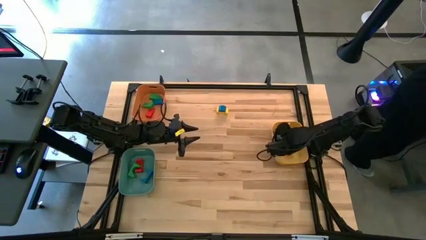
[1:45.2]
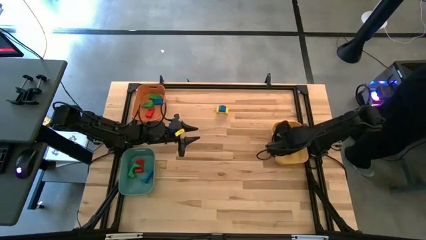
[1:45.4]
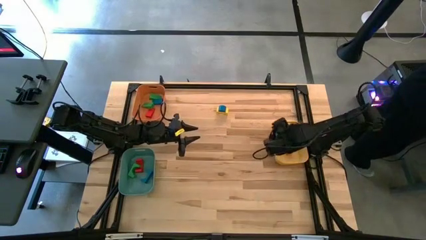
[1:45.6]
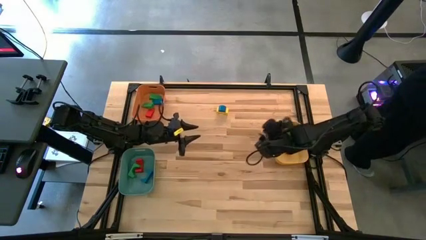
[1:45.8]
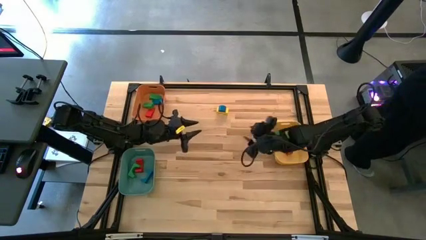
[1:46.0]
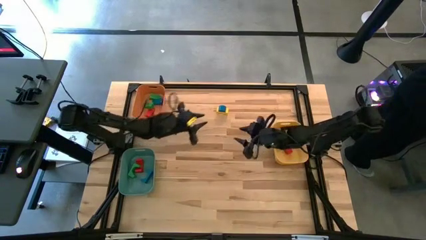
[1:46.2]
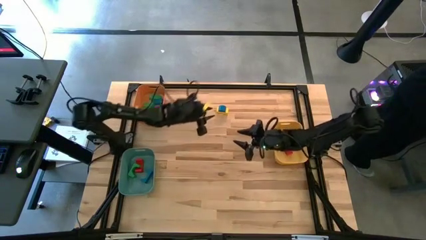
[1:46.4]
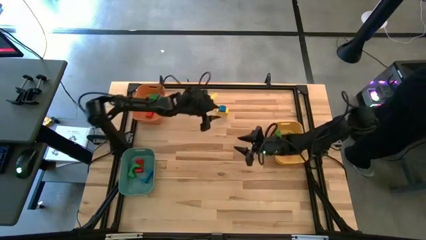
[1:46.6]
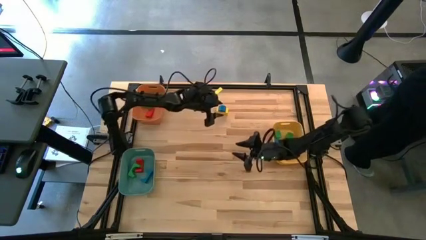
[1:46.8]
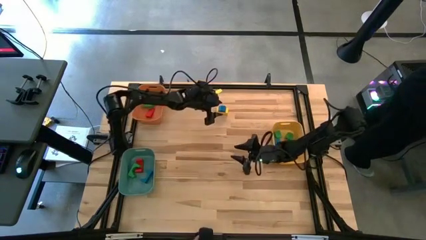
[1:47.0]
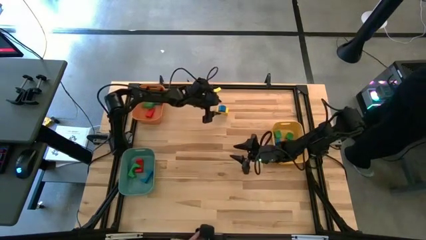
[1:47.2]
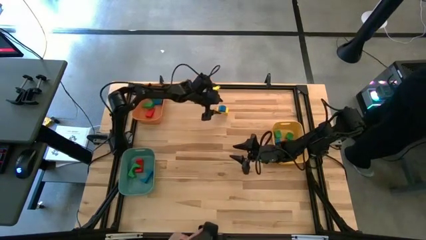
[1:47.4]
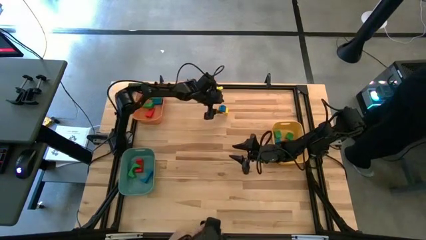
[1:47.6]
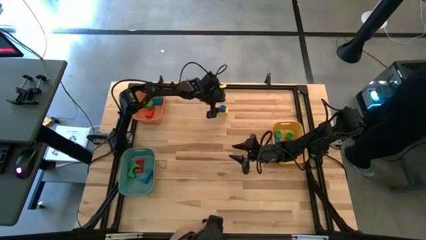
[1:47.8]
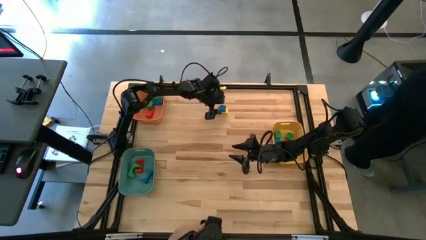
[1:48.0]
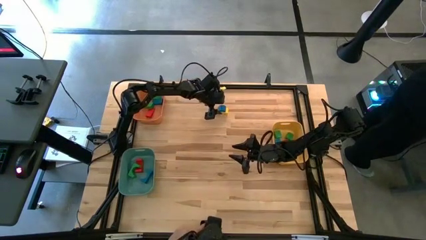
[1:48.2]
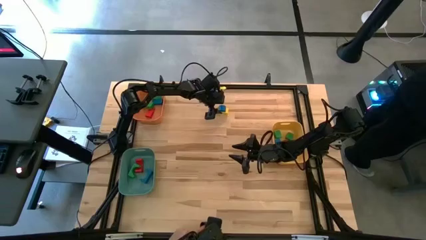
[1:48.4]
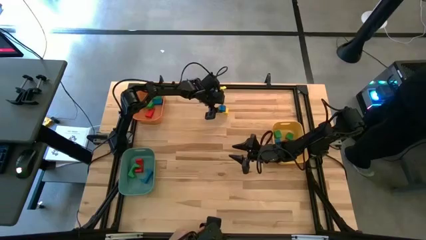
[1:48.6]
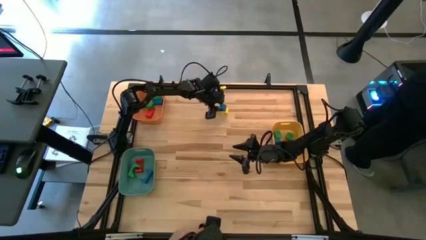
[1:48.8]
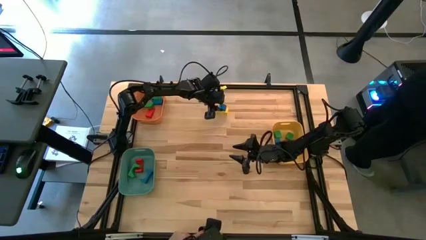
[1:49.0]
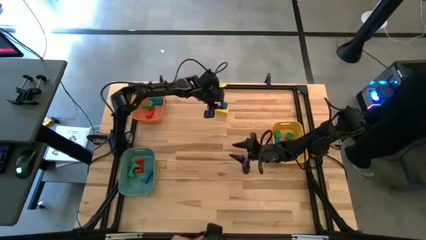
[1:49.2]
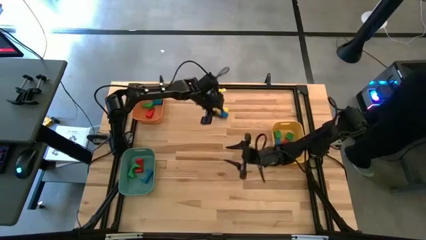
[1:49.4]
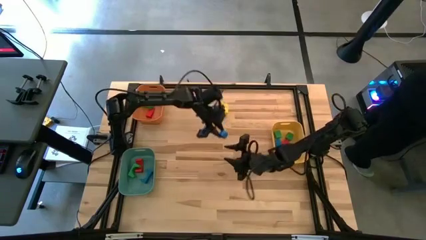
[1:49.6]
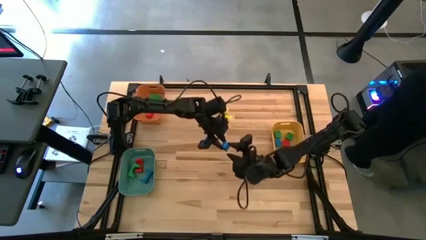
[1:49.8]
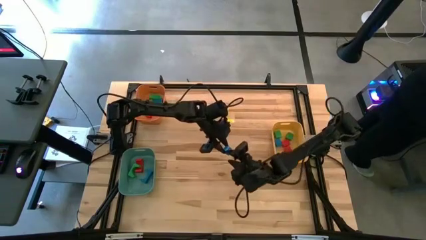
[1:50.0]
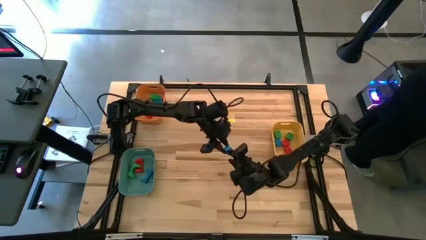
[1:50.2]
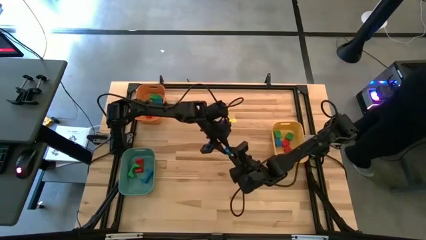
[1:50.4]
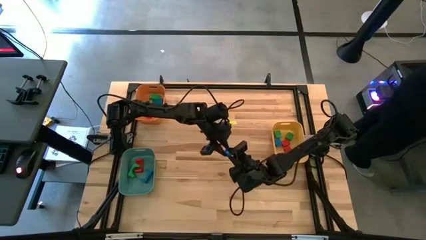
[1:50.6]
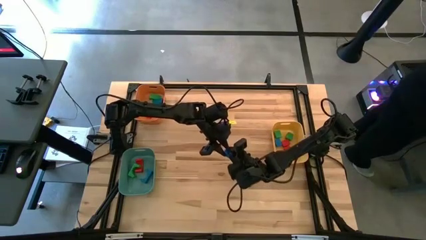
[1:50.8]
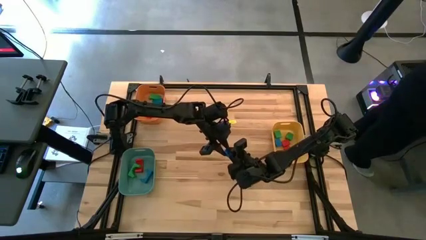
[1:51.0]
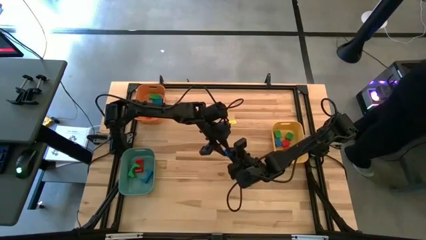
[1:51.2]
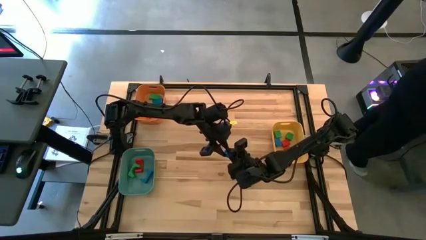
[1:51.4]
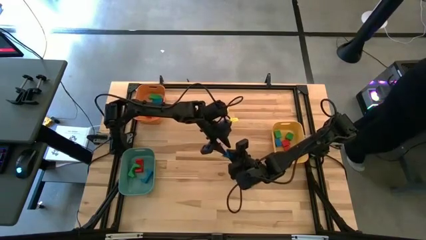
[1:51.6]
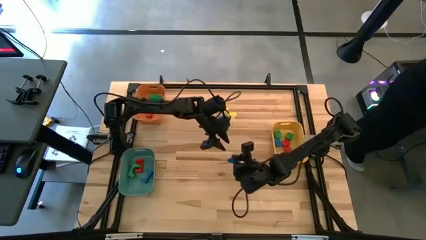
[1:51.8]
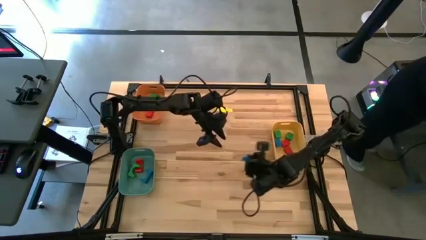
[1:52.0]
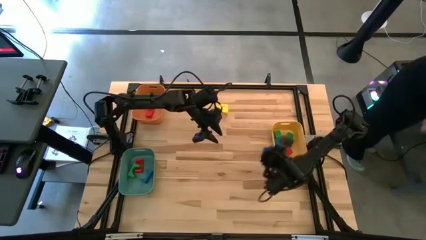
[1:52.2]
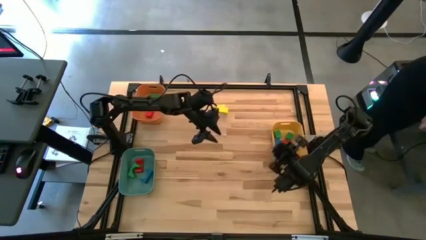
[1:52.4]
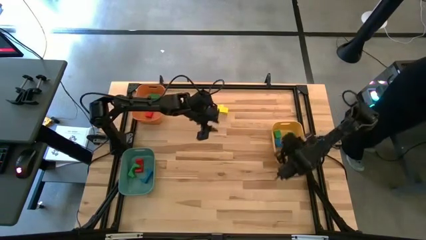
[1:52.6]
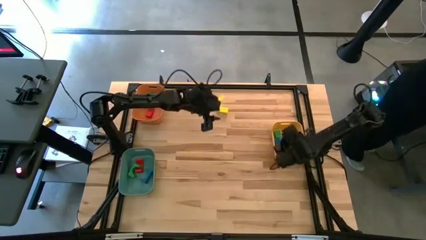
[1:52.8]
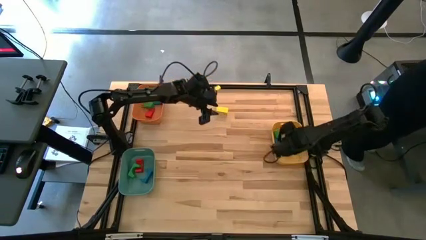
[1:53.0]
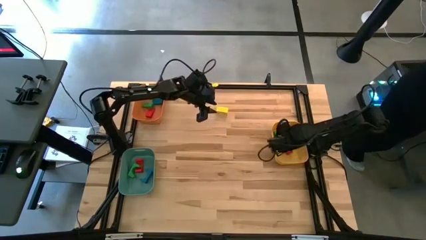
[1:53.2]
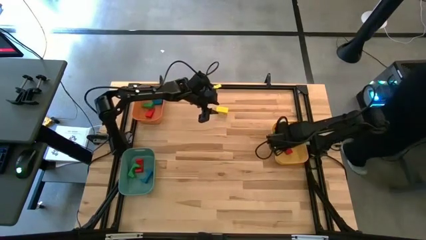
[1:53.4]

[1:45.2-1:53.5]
Task: Sort blocks by size
Put the blue half-circle block into the yellow bin

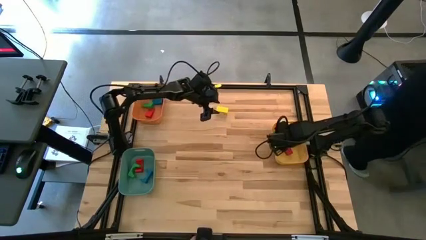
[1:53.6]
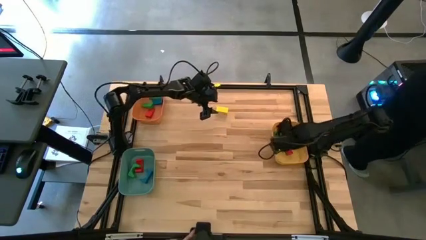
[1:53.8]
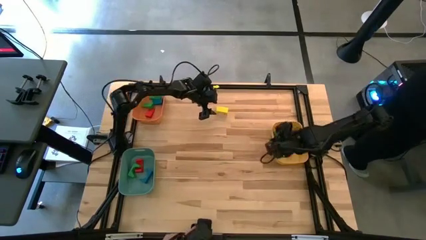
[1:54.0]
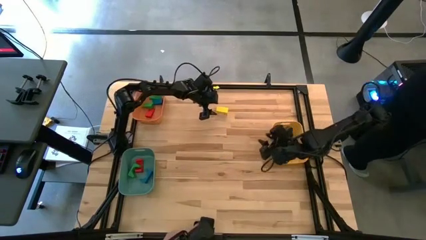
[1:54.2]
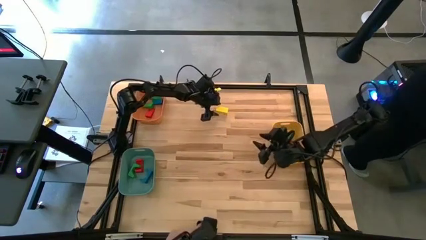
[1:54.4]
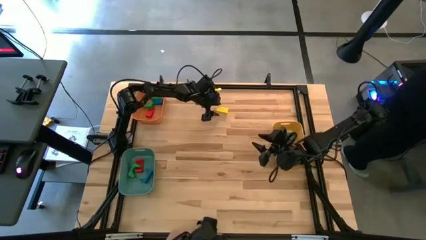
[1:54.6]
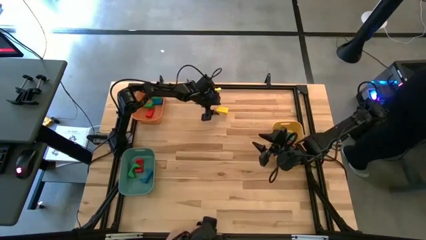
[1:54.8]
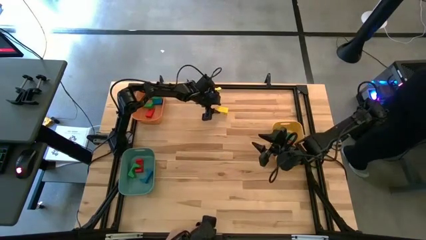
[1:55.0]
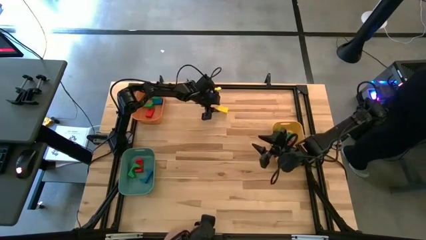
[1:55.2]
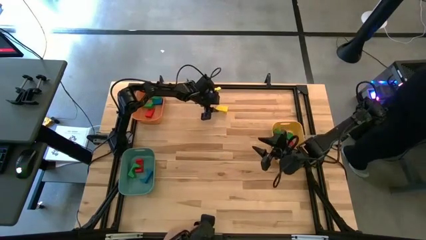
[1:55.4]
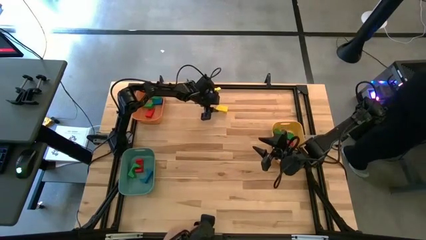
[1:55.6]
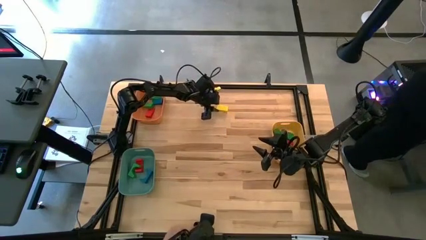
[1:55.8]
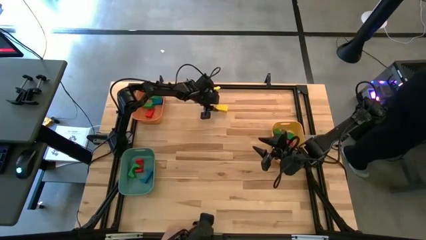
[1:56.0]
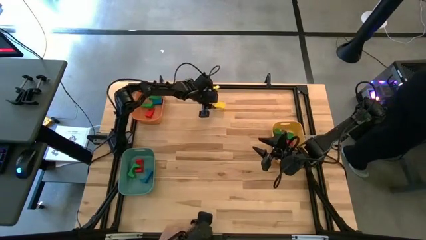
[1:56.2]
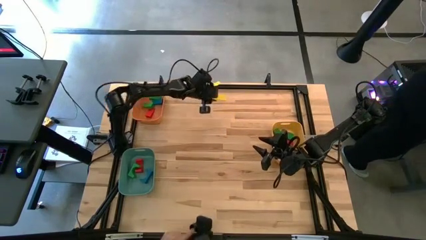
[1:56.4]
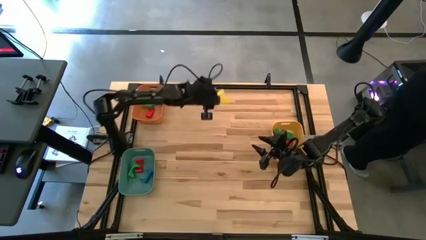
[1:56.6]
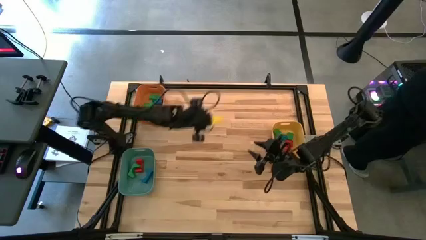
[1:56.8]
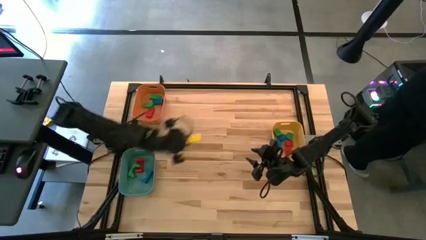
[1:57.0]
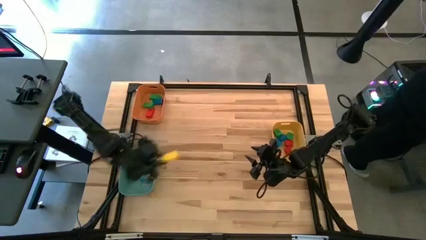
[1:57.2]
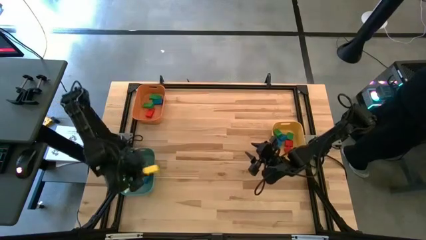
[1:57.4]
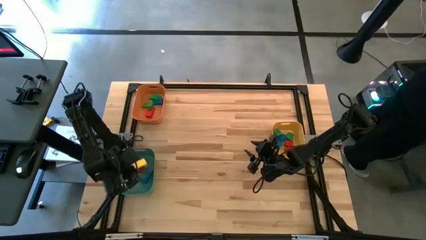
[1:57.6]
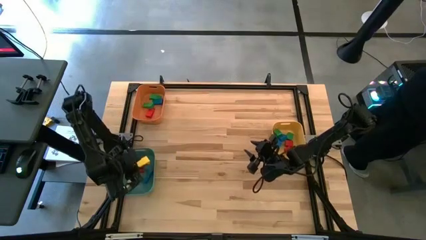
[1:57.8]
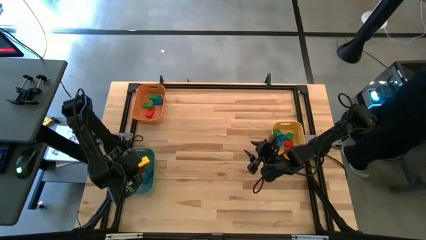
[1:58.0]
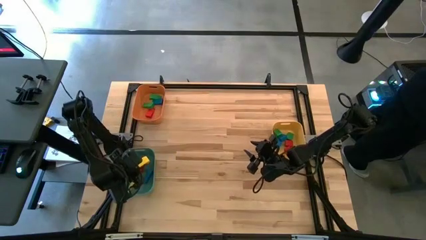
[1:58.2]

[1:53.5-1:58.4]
Put the yellow arch block into the blue bin

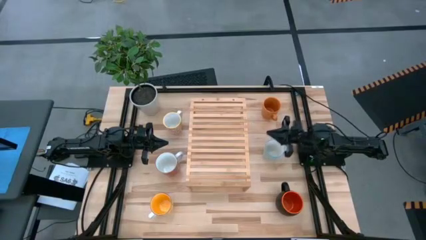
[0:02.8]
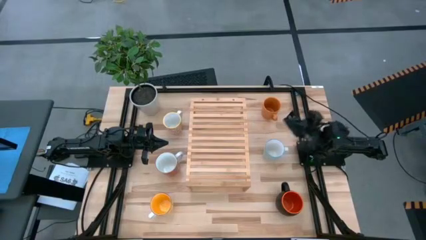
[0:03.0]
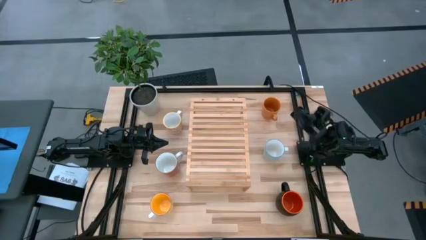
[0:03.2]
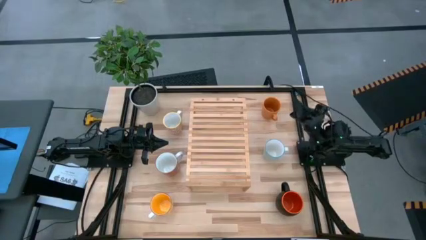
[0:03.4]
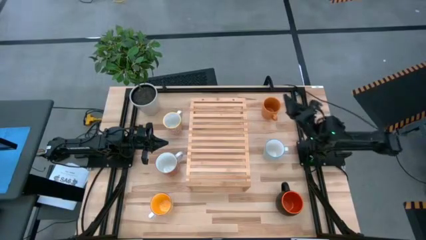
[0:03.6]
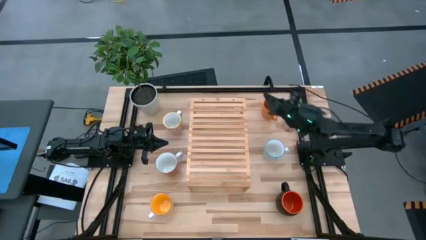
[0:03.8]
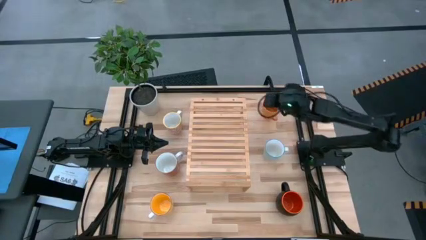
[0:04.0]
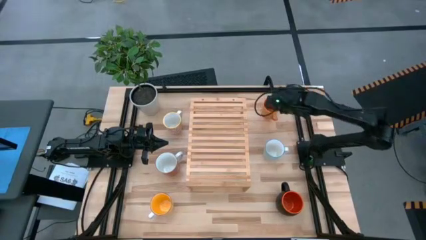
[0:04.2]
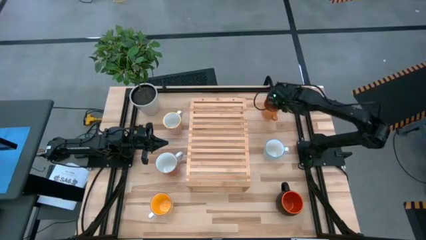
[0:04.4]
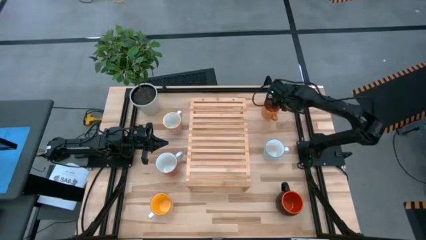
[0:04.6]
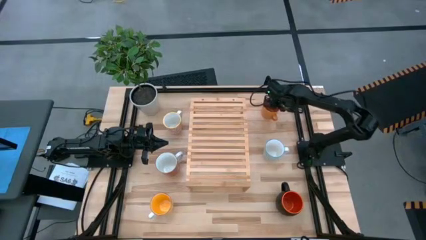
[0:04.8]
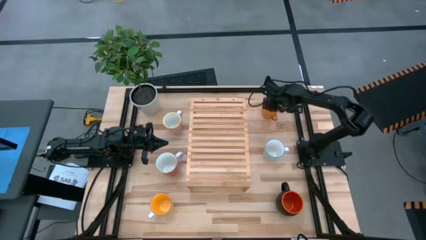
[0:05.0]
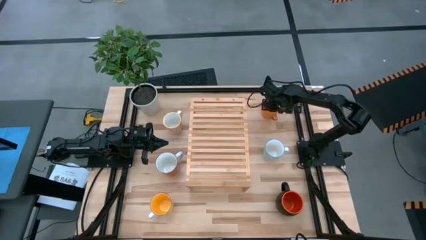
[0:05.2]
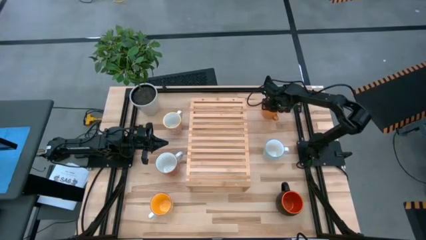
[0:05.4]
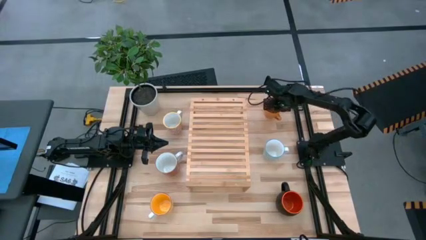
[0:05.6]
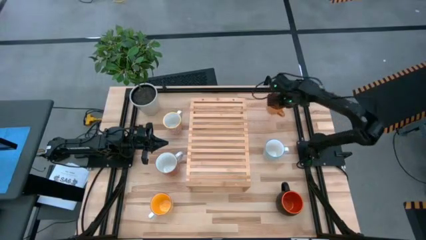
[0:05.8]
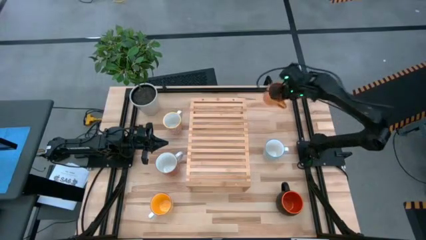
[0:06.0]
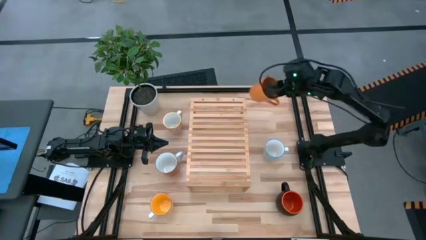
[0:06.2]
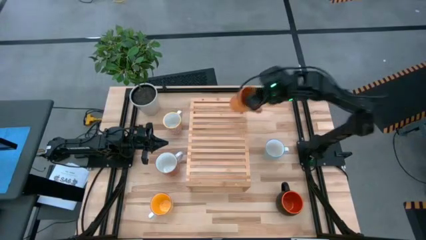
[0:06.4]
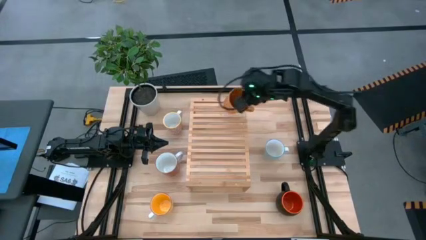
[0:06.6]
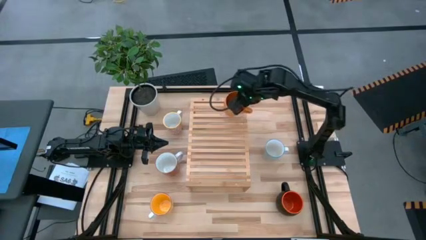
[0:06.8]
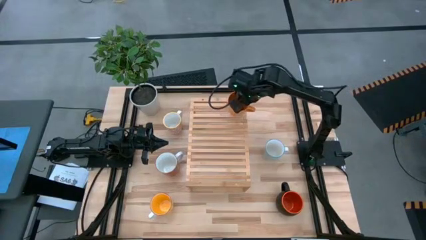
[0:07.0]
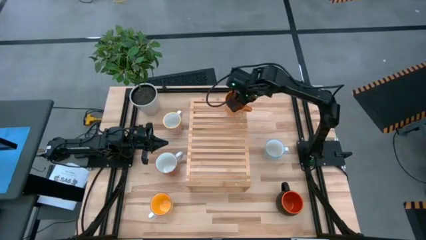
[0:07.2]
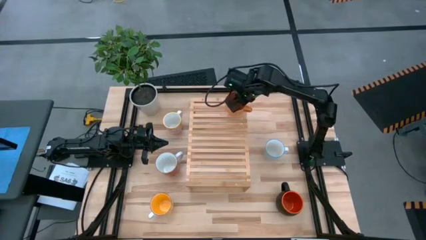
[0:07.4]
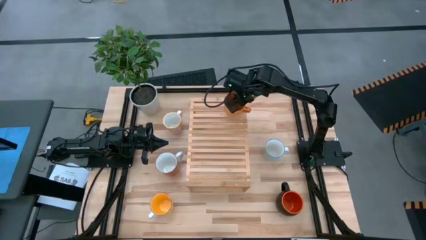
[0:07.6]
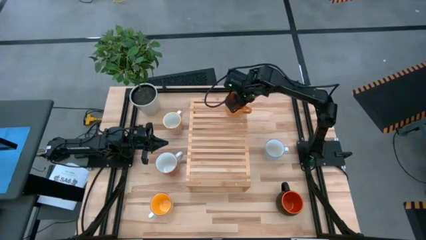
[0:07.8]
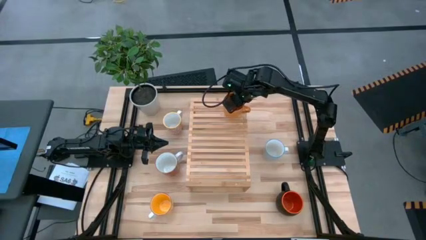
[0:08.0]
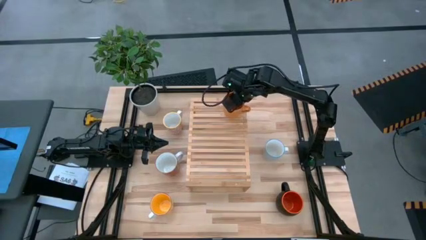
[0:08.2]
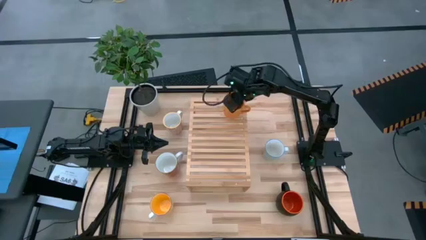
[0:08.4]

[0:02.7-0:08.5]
Task: Place coffee mugs
Put the right orange cup on the shelf
